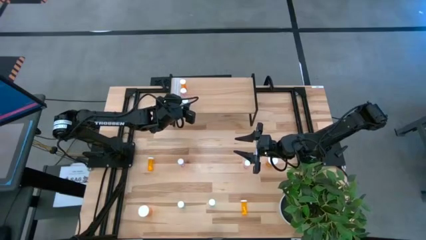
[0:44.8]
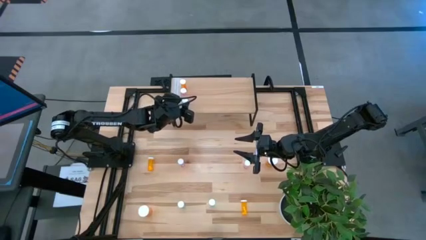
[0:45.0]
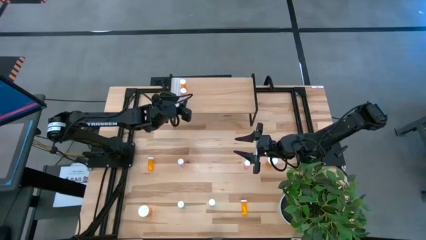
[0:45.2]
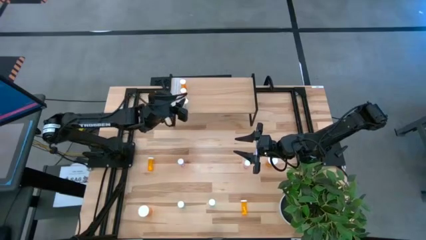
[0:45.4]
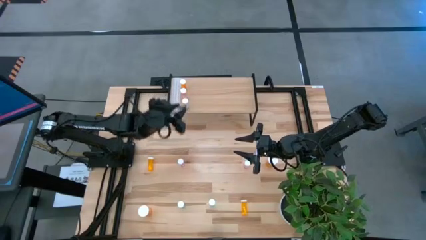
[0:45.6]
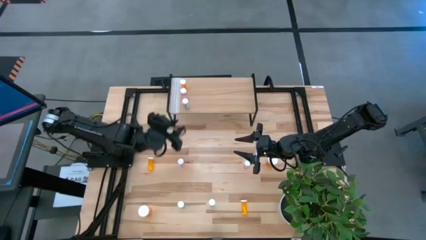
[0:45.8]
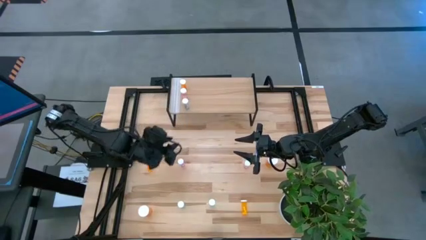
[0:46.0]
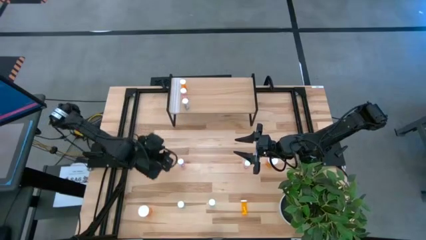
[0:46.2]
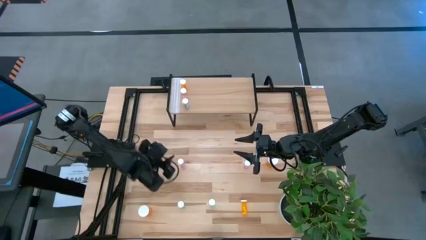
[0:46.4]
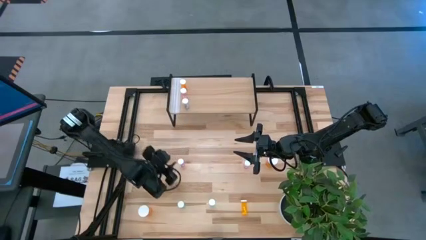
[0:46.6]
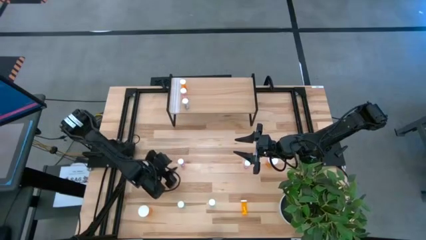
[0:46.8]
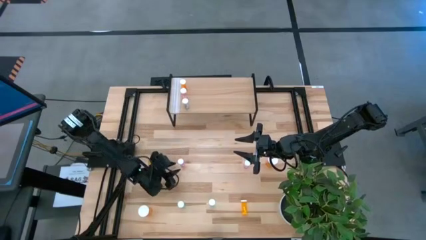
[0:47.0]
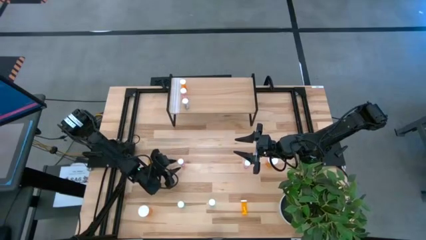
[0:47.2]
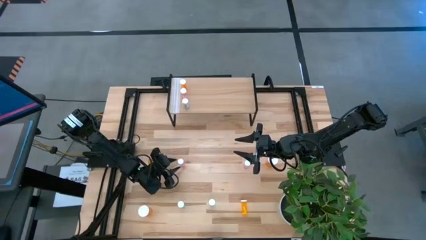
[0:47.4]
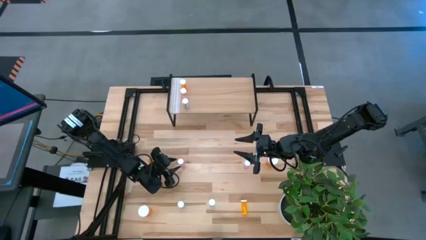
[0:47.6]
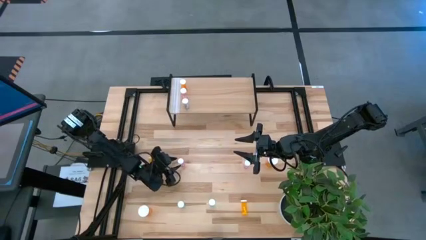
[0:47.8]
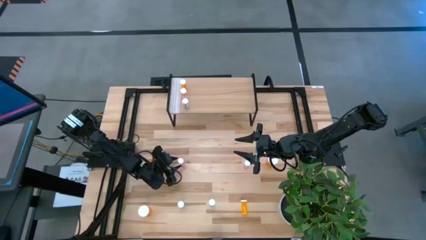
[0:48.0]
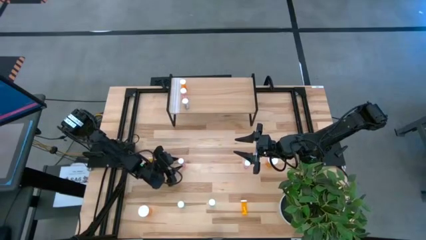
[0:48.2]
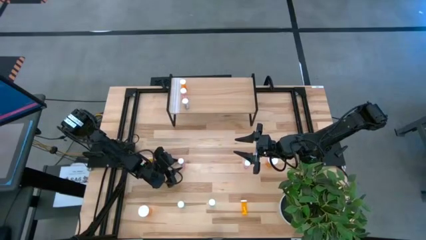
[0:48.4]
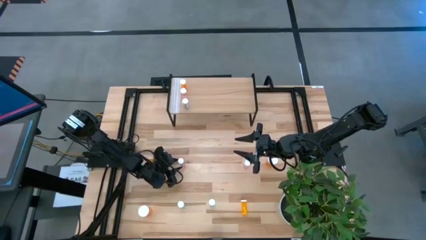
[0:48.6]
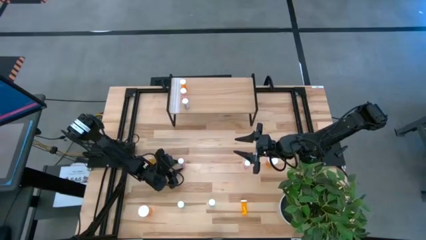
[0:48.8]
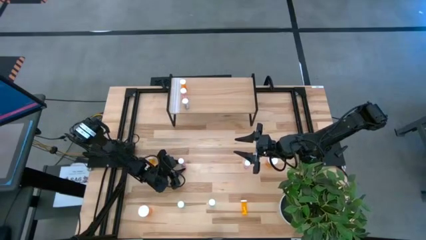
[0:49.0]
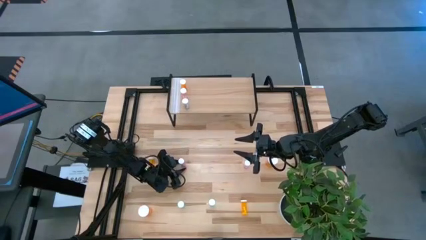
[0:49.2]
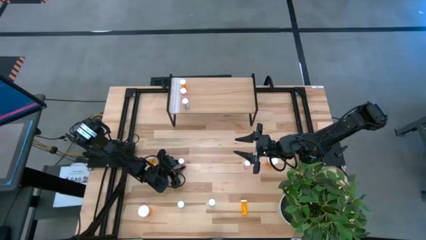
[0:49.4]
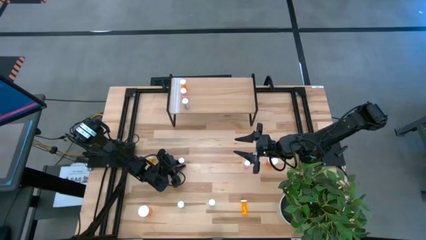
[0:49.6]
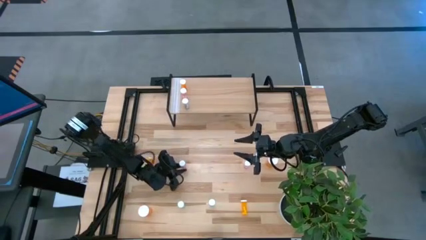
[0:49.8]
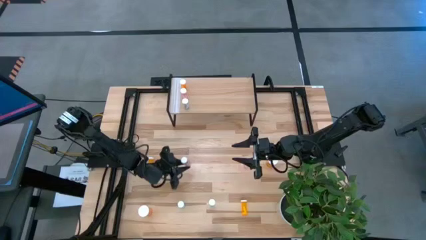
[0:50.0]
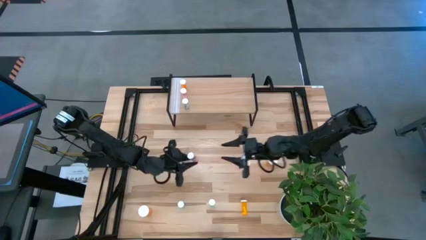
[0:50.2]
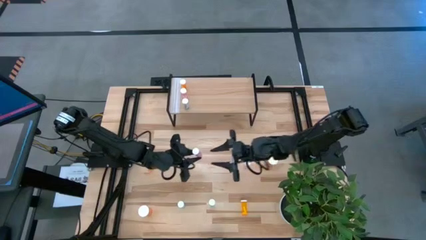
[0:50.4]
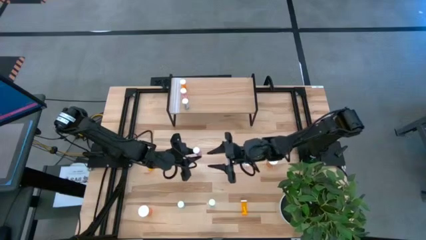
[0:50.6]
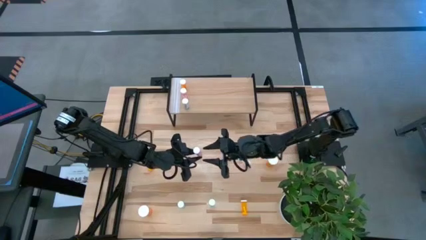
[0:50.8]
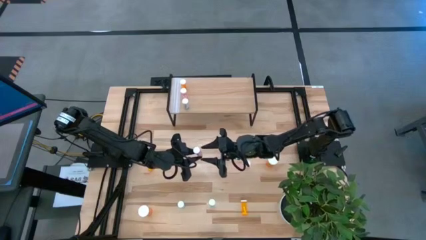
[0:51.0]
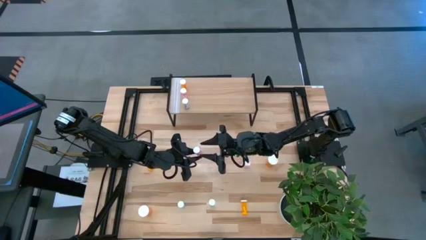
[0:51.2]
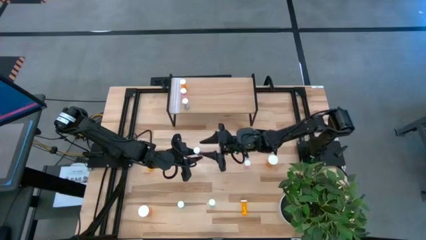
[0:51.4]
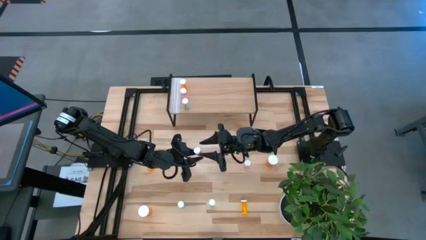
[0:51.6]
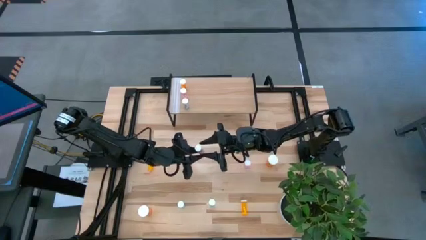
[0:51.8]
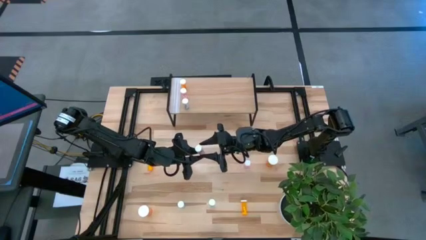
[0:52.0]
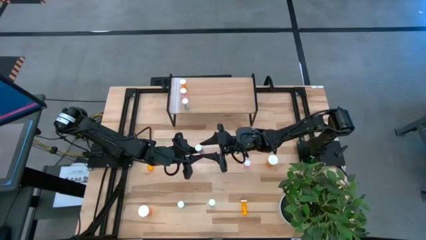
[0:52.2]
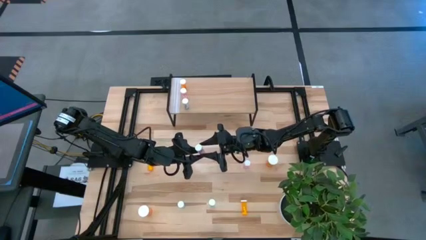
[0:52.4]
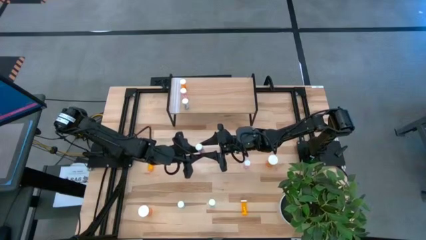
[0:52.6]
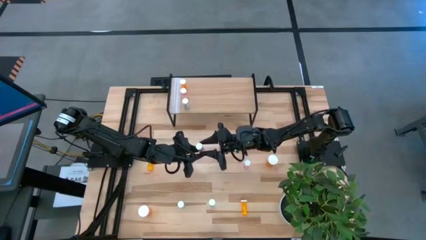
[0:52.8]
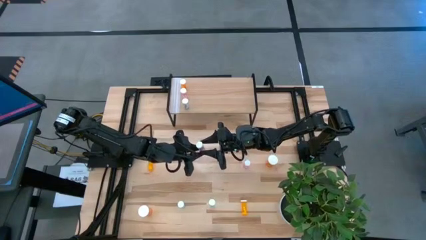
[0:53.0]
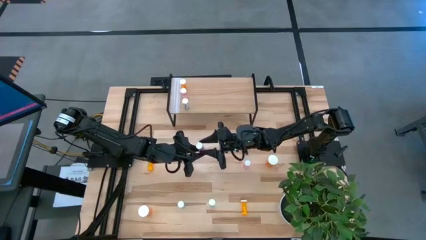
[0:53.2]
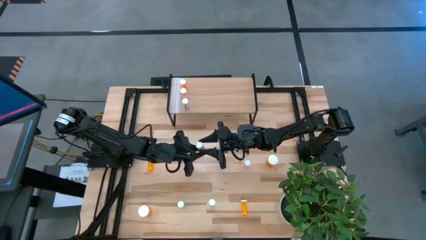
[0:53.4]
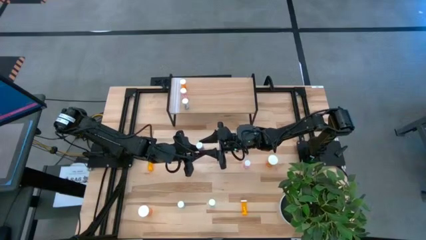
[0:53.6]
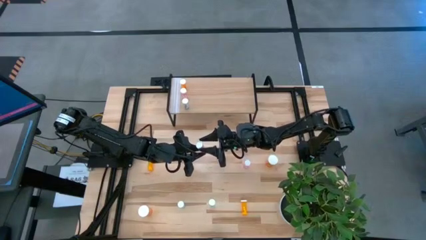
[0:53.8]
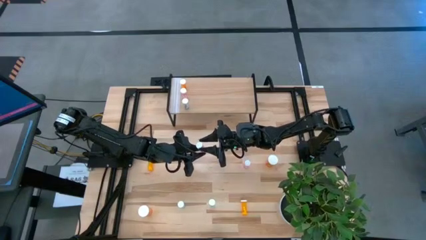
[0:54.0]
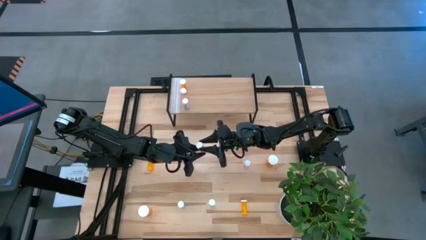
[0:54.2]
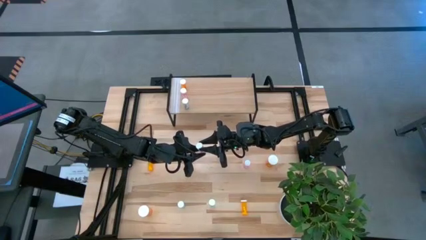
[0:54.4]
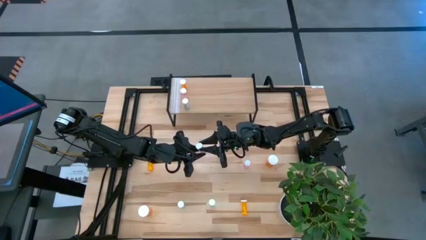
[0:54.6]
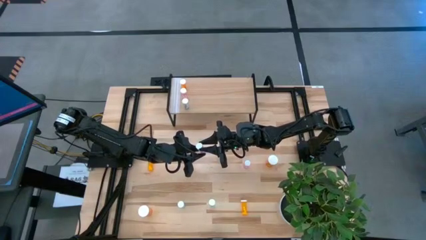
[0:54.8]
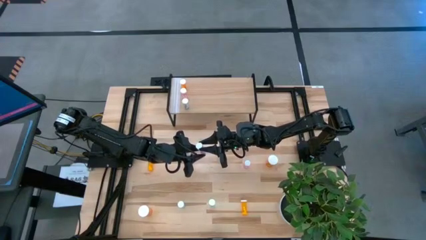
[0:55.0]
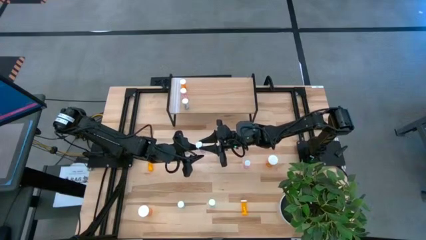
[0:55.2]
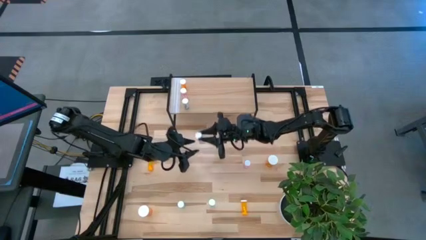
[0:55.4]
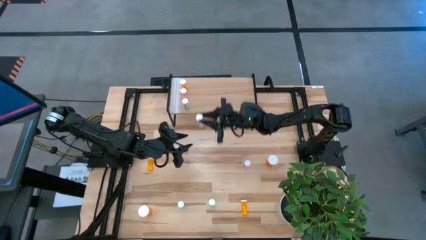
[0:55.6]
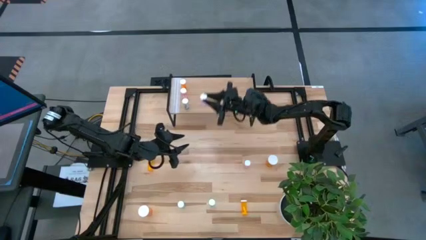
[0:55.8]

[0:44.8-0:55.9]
Task: Pick and place medicine bottles onto shelf by color
Put the left pink pill bottle on the shelf
